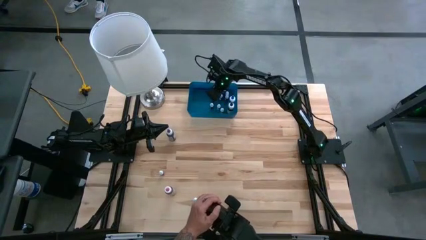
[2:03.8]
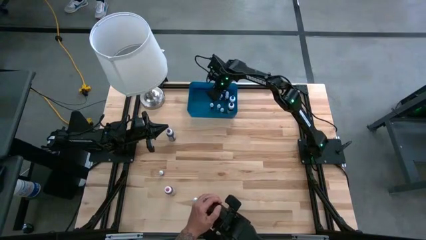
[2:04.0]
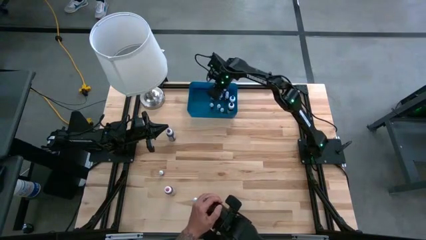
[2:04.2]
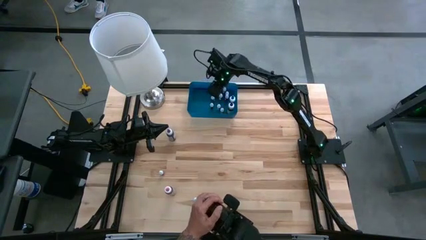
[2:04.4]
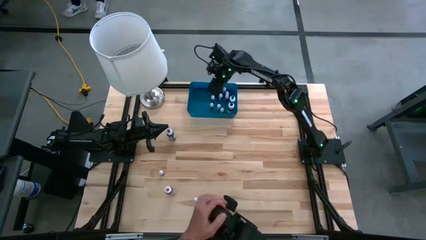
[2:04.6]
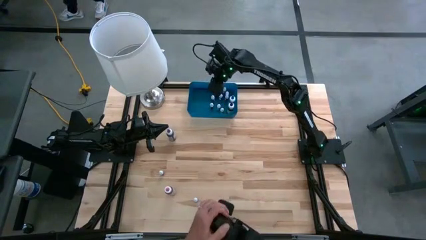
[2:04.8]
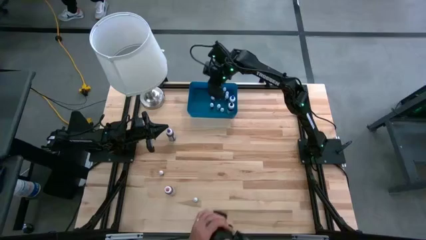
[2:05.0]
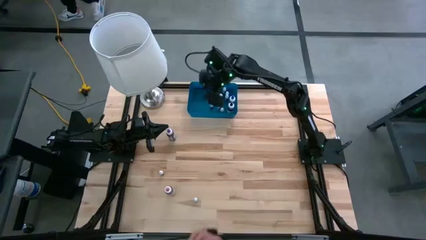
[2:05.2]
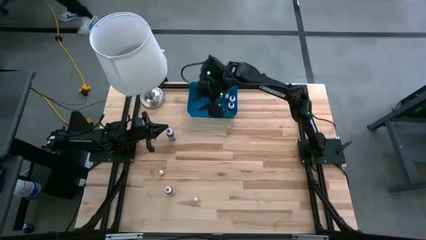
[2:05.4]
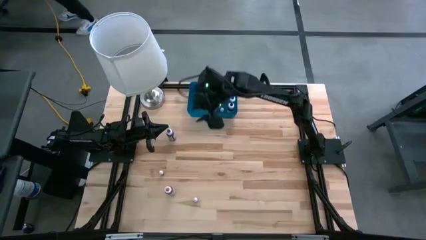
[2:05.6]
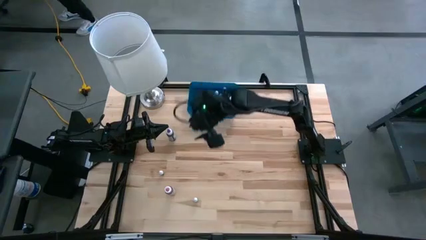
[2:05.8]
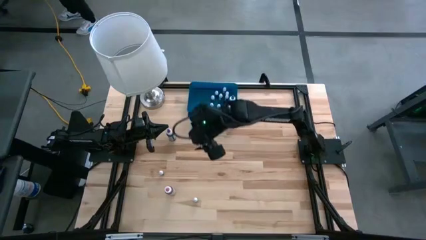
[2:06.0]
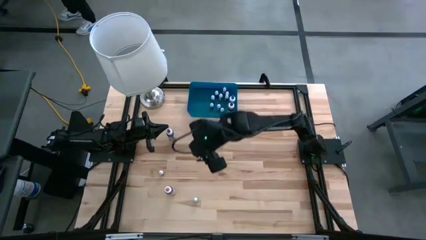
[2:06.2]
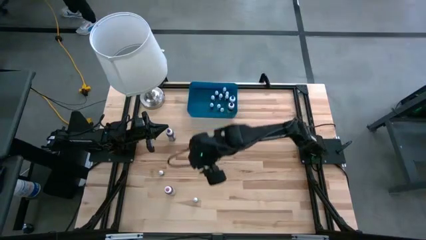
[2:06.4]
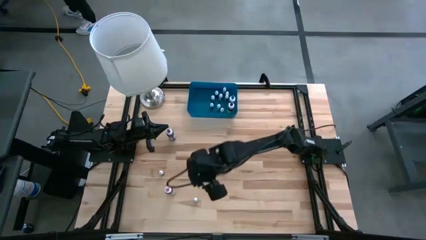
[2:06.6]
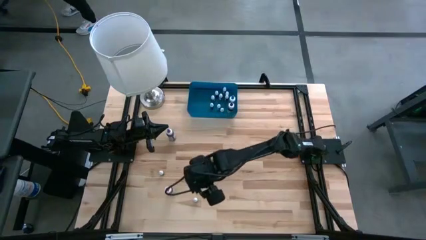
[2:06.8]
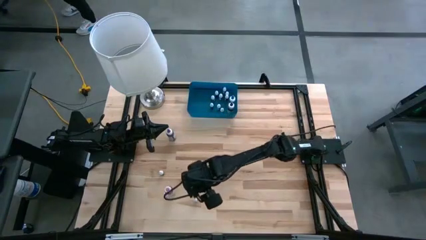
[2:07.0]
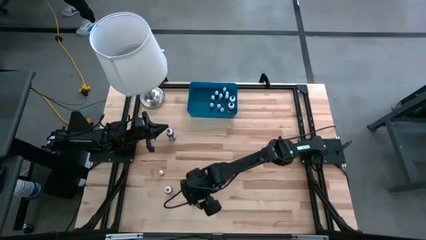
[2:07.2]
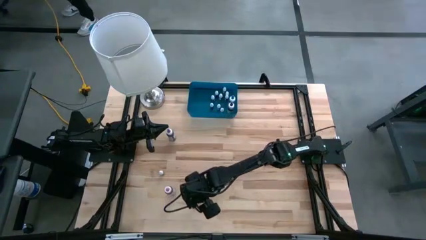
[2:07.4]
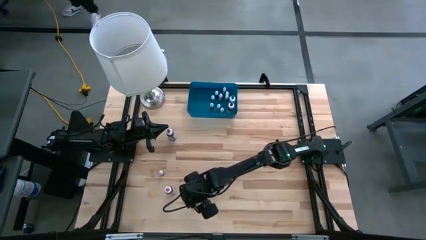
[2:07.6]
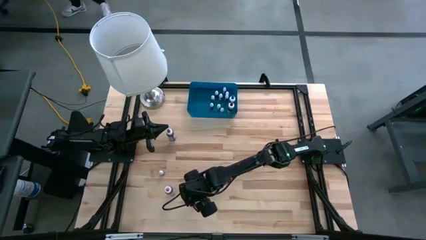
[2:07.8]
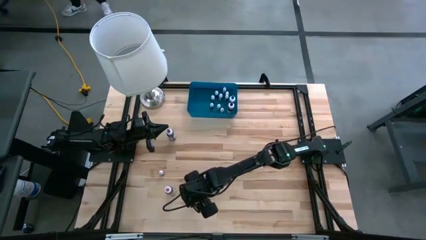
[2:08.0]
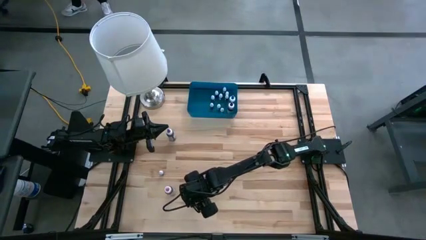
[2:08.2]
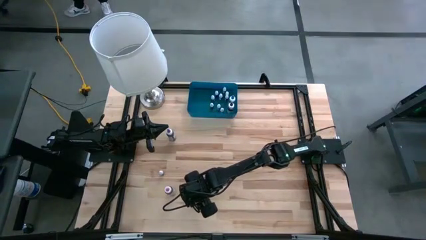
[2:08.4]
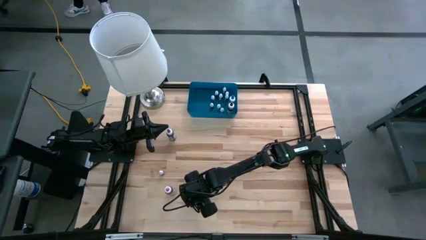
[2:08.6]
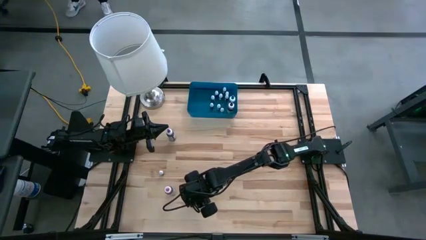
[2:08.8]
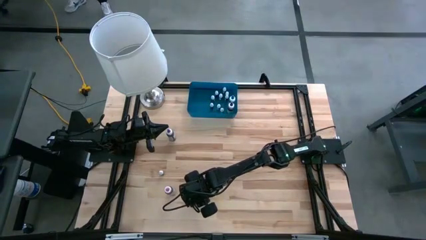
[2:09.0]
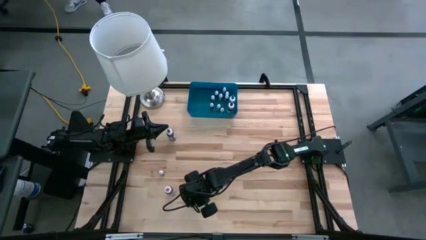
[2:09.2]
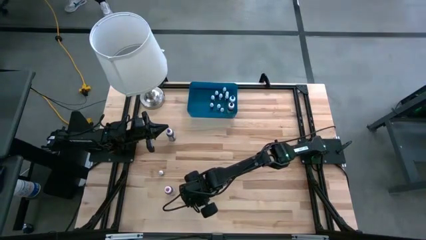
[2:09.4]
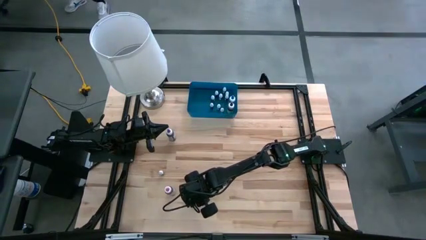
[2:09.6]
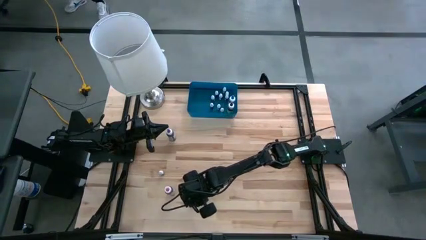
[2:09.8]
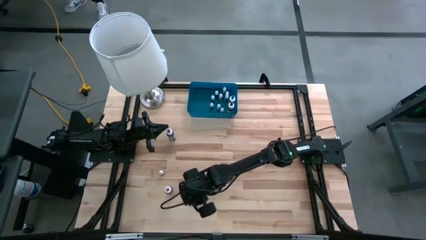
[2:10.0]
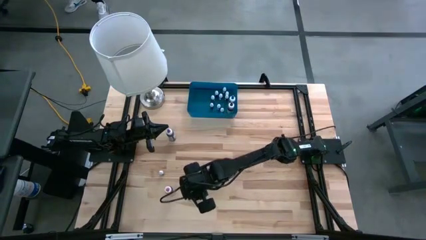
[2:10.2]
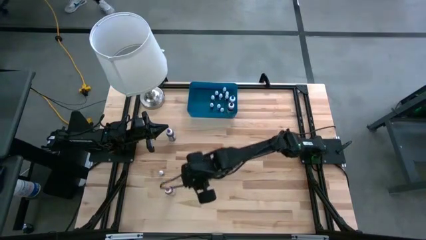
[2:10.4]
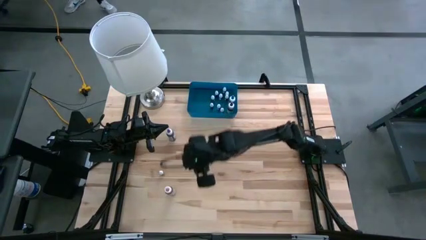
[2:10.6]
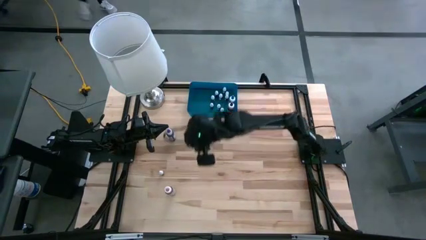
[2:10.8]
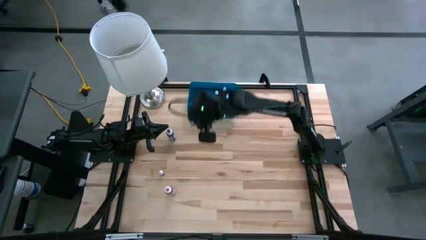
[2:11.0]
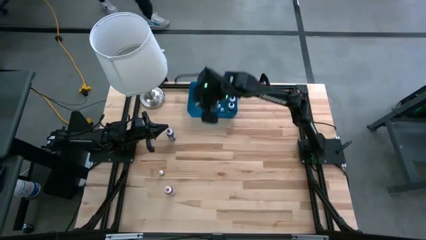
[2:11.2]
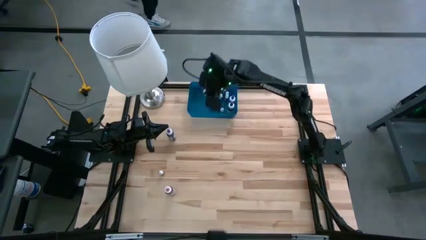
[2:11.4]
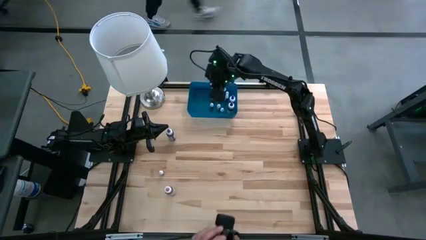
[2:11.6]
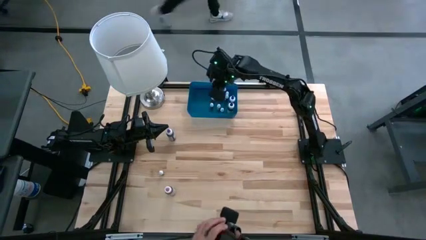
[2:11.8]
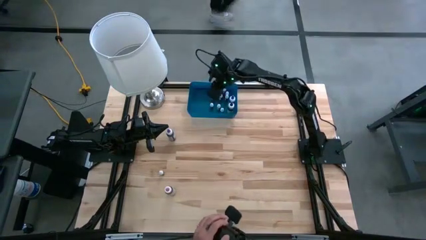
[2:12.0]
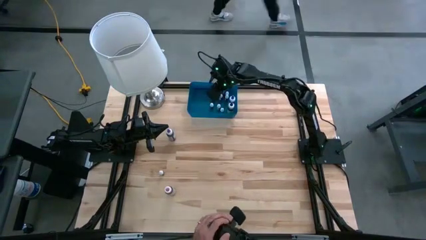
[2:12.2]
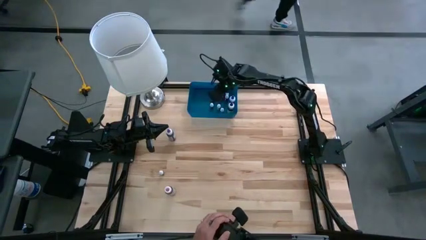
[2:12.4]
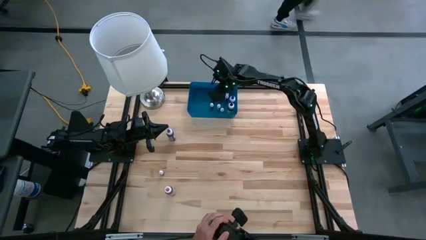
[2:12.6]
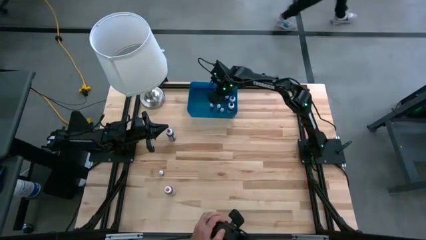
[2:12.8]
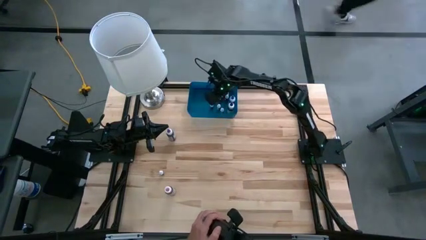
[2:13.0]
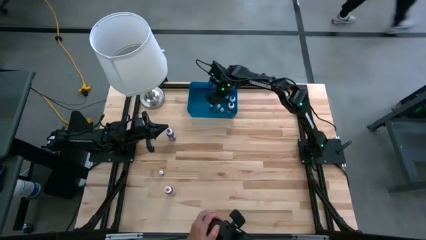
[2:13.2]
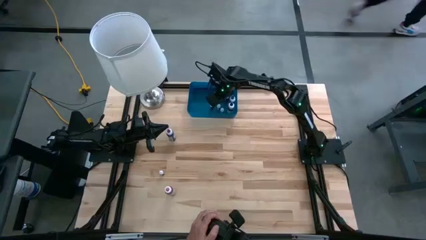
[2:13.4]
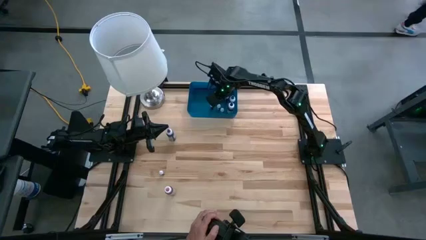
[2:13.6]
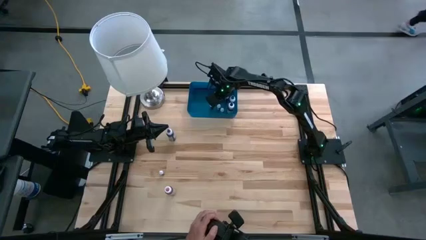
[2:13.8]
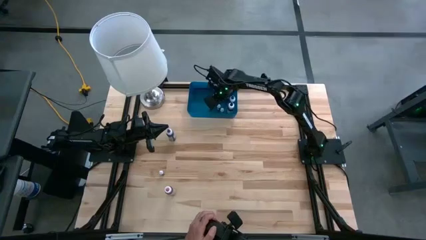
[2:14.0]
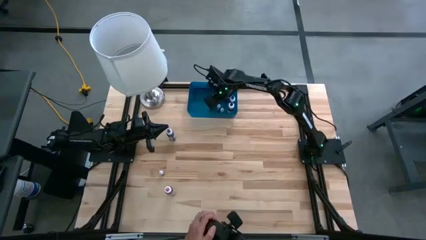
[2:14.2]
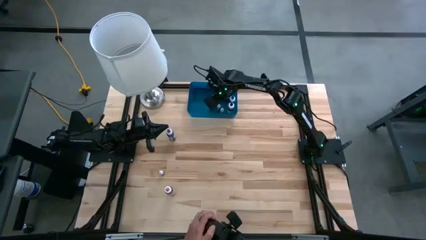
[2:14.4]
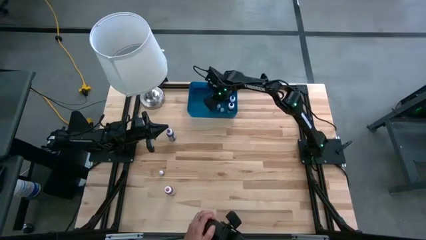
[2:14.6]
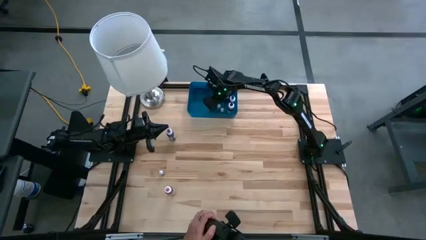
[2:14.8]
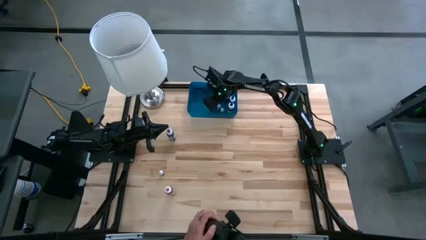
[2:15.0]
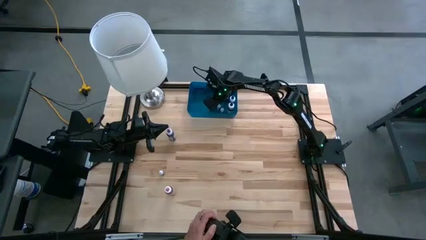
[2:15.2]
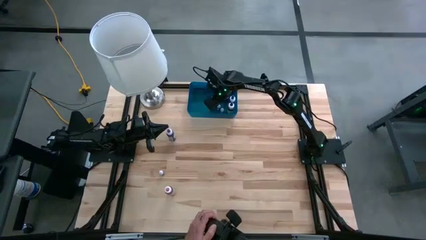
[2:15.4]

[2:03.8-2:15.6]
Task: Pick & Place food coloring
Put the small black food coloring bottle into the blue bin
